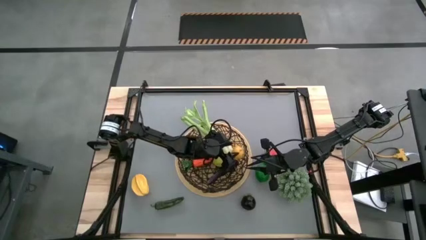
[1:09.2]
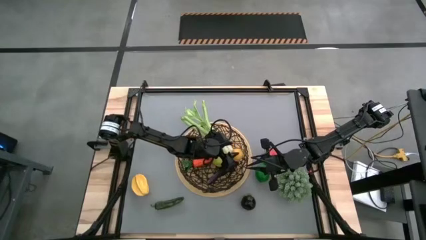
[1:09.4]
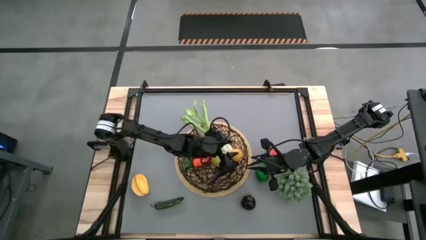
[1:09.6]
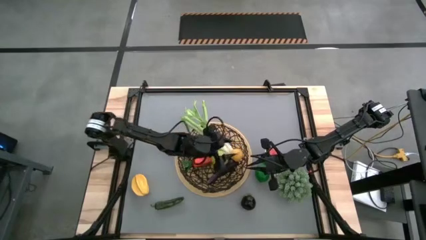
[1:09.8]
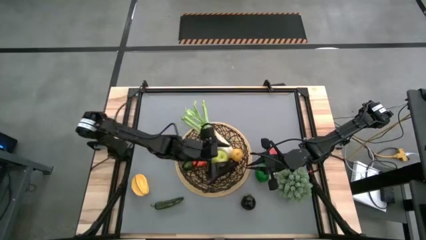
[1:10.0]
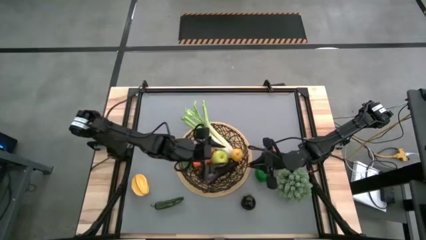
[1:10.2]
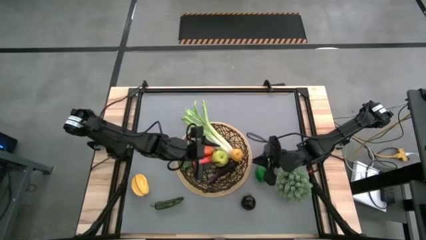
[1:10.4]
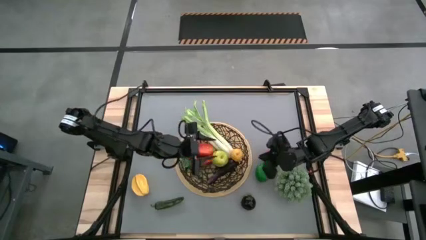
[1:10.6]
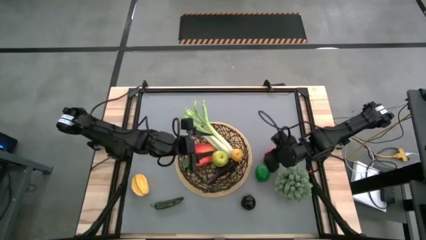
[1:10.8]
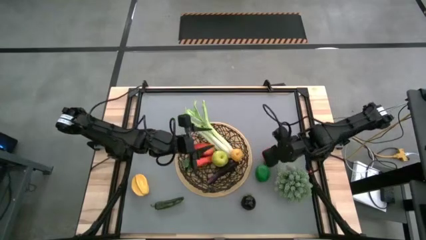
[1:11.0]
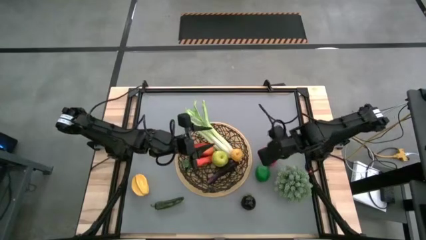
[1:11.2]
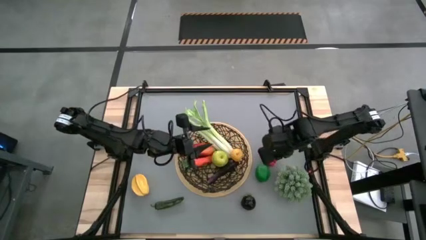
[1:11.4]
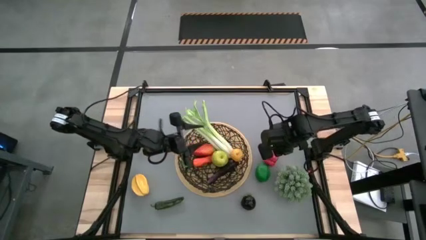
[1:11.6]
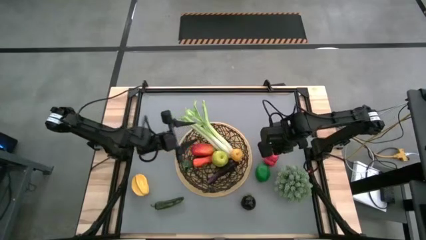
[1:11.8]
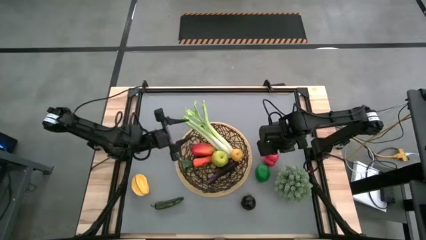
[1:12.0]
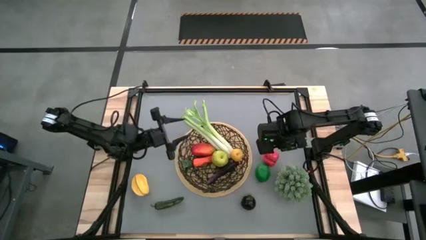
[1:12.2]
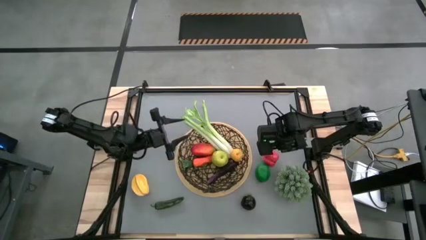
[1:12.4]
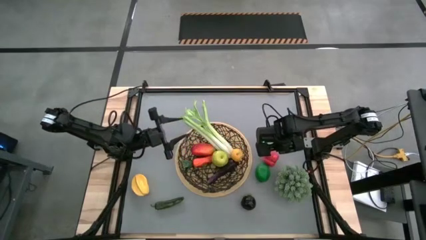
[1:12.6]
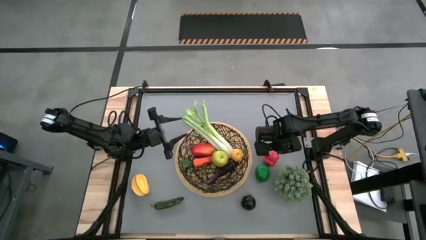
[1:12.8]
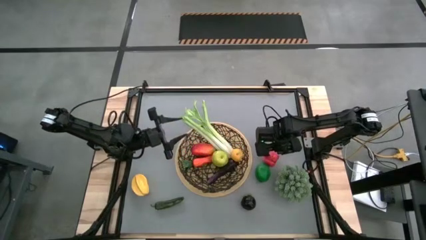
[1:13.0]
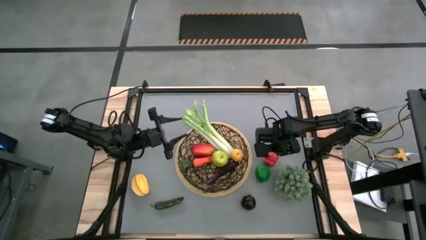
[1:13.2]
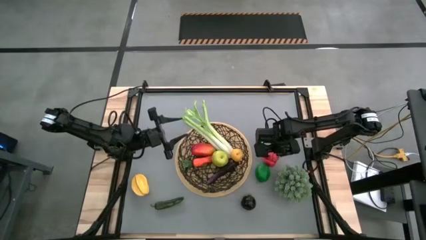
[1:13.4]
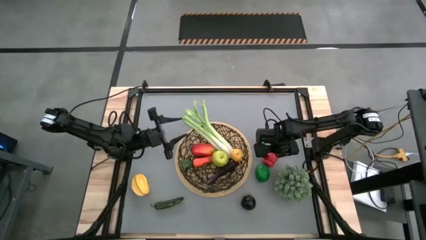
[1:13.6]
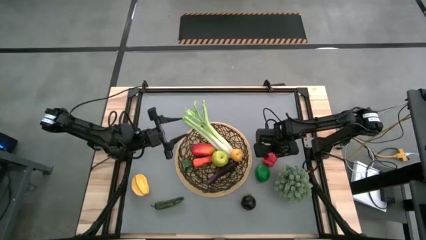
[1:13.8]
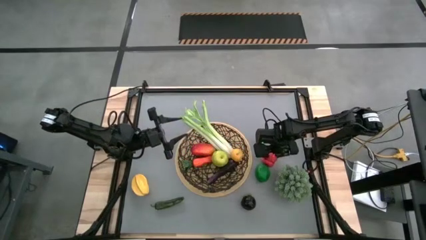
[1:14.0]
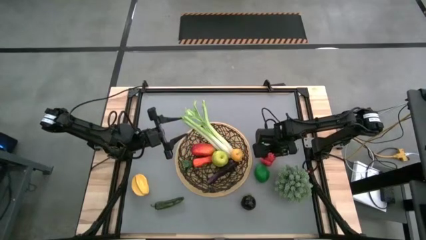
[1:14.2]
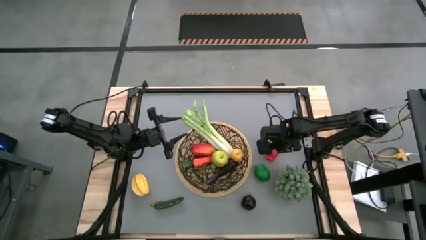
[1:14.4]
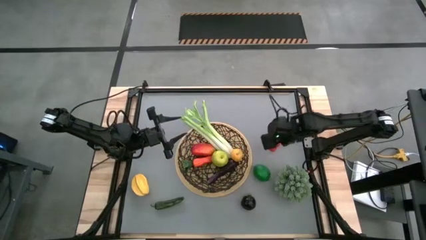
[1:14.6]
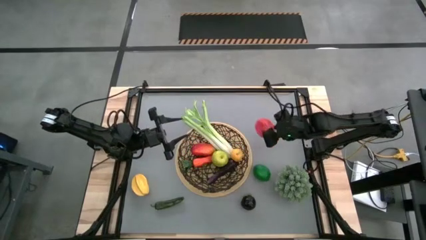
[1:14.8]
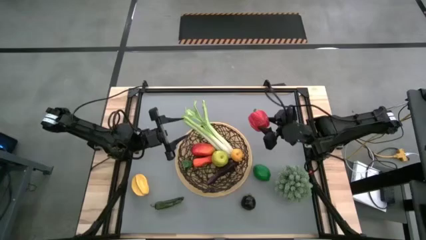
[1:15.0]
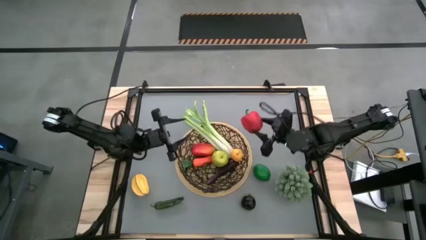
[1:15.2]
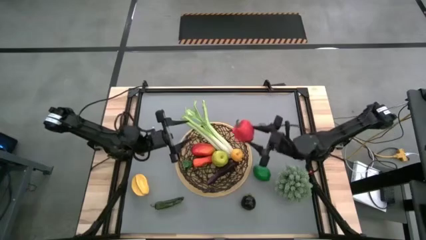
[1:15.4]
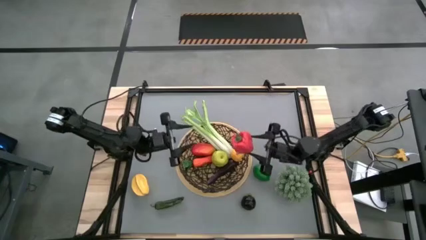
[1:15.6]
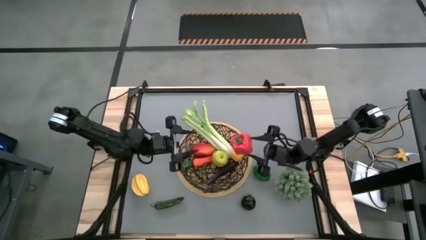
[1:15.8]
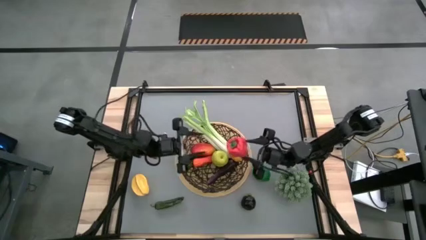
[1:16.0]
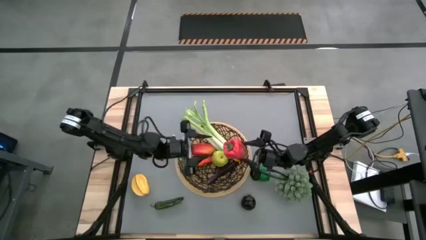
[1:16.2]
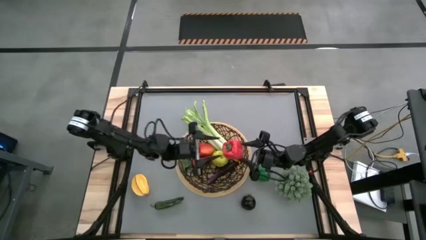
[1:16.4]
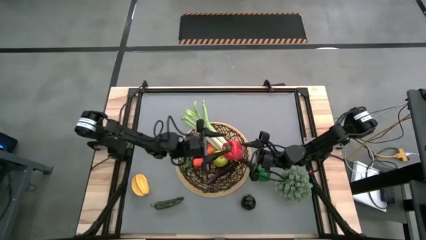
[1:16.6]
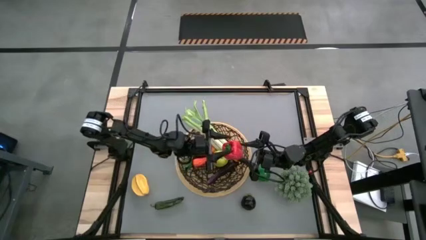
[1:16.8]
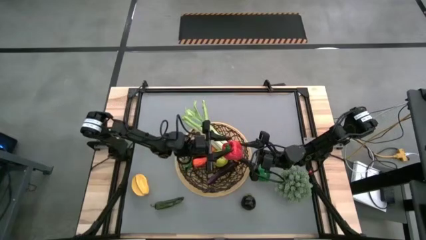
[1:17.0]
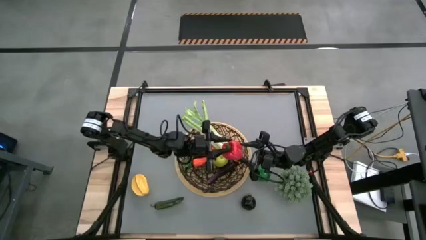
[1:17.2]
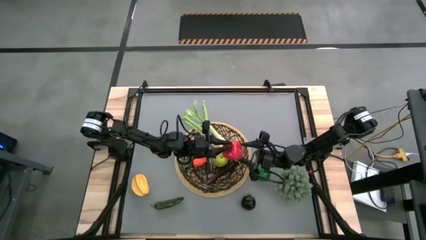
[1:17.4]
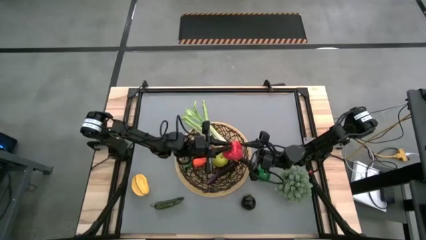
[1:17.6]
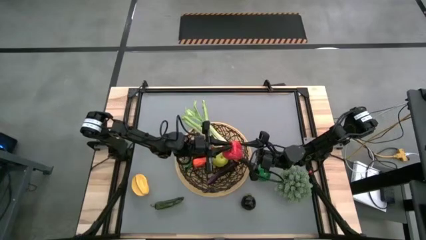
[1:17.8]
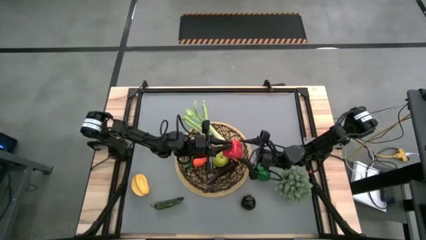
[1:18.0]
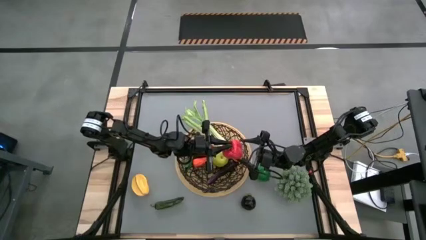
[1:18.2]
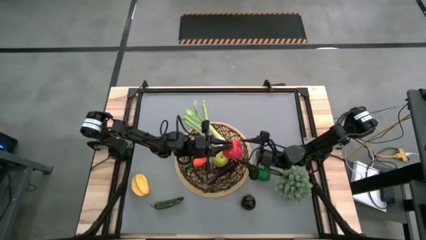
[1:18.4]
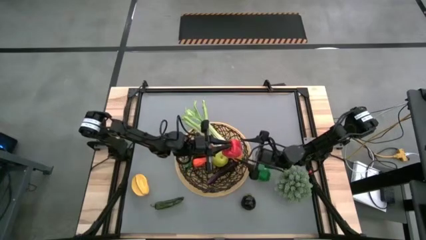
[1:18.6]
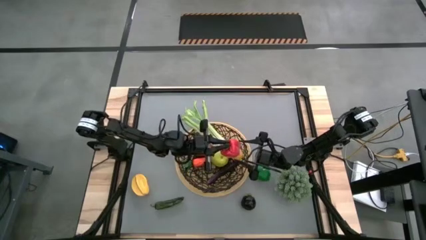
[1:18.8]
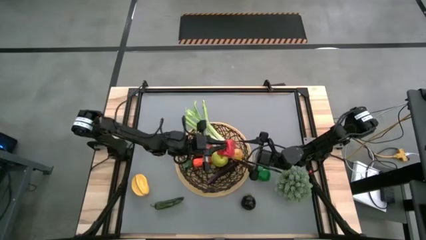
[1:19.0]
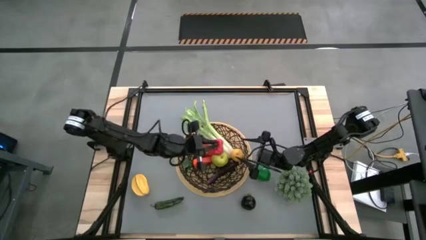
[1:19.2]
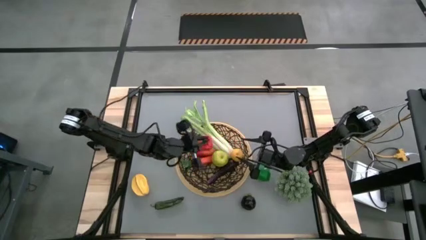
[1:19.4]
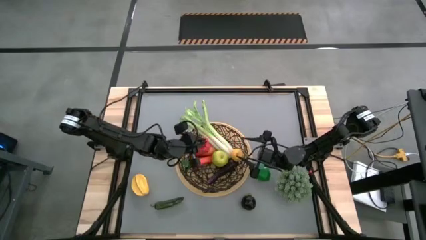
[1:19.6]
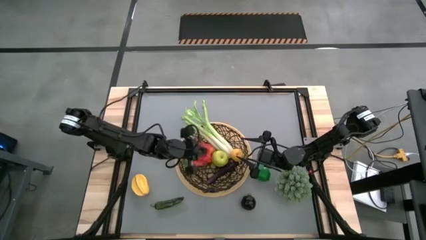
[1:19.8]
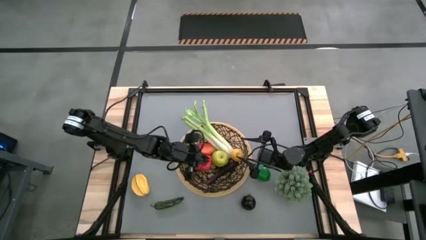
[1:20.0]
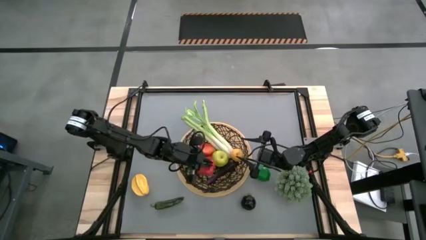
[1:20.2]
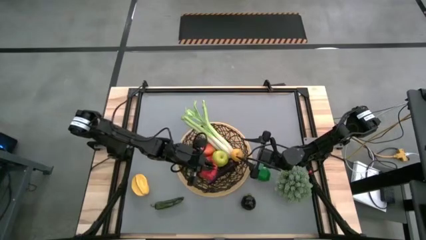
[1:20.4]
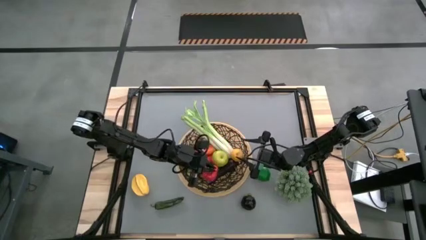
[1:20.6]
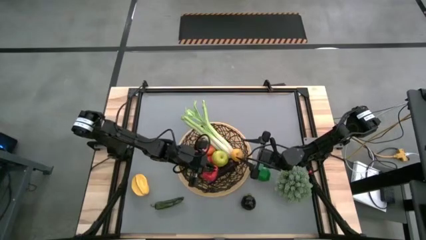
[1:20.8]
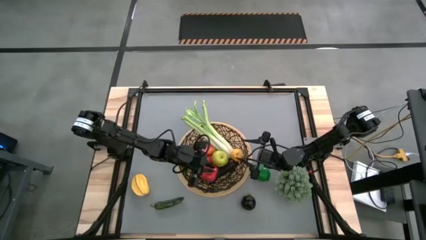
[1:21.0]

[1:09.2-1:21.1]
Task: Build produce basket
Put the red bell pepper into the wire basket

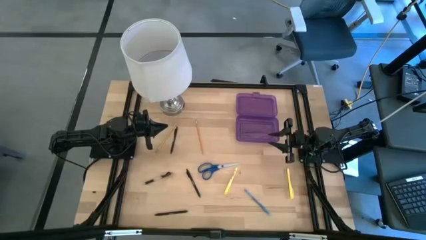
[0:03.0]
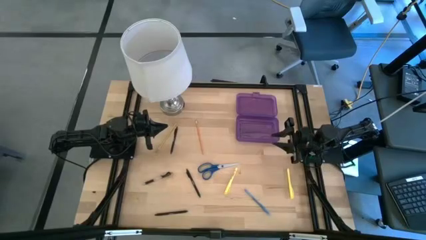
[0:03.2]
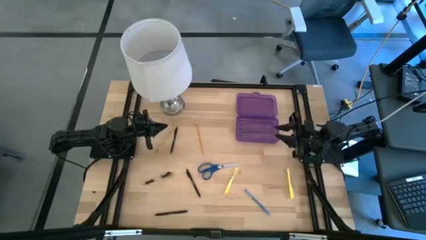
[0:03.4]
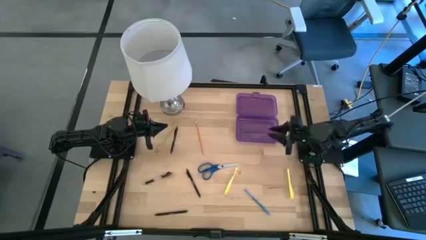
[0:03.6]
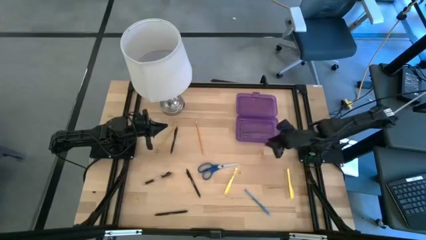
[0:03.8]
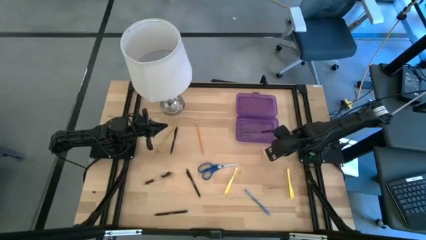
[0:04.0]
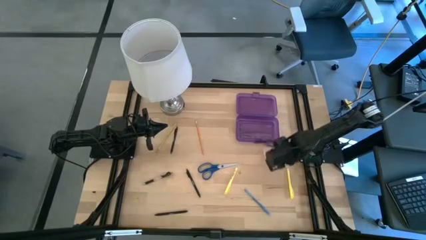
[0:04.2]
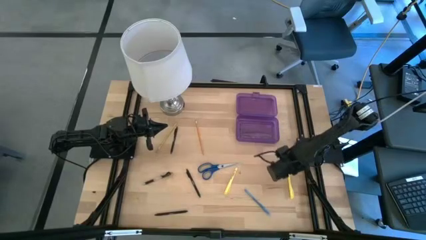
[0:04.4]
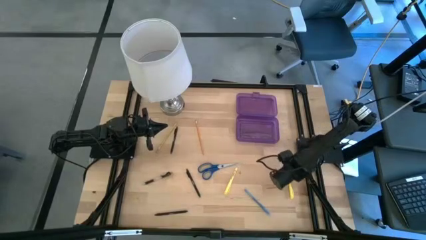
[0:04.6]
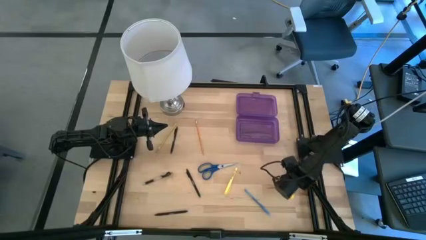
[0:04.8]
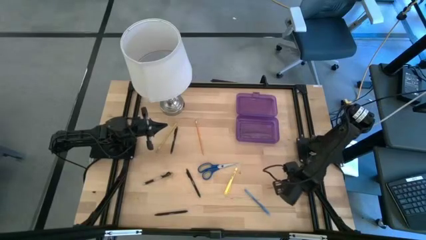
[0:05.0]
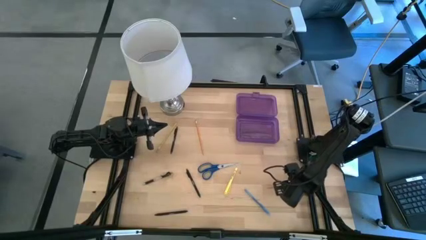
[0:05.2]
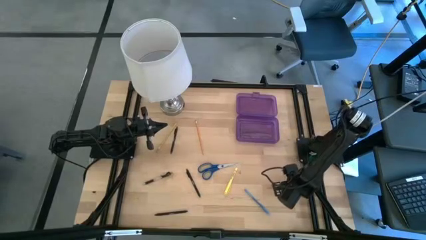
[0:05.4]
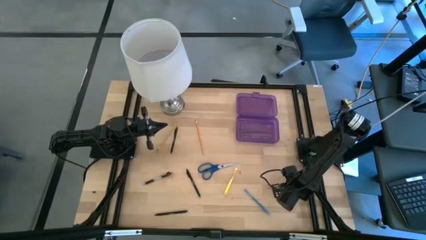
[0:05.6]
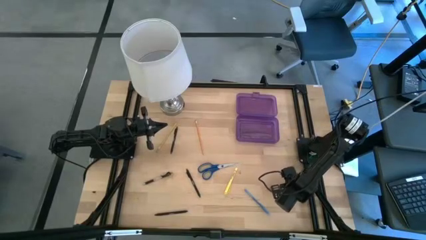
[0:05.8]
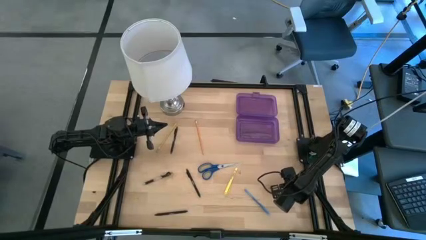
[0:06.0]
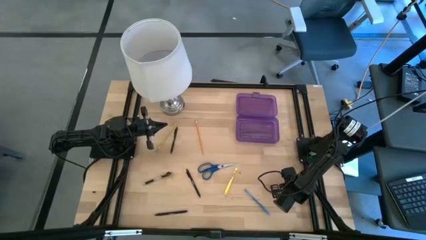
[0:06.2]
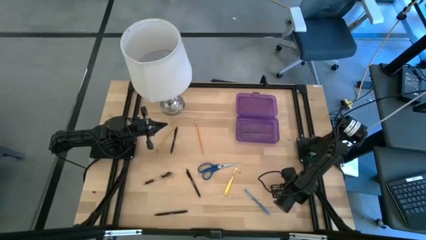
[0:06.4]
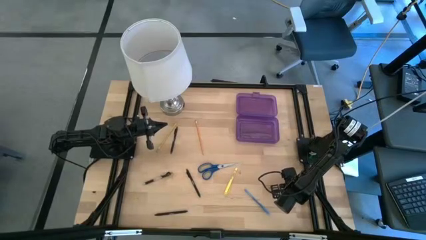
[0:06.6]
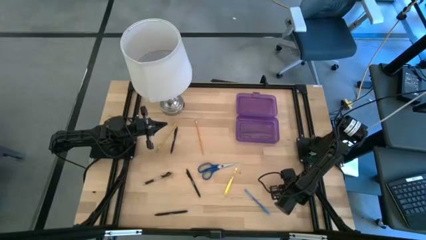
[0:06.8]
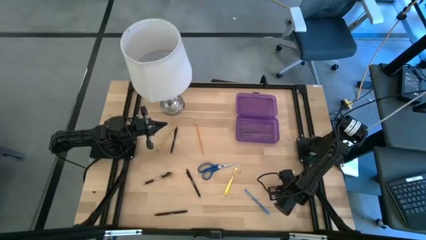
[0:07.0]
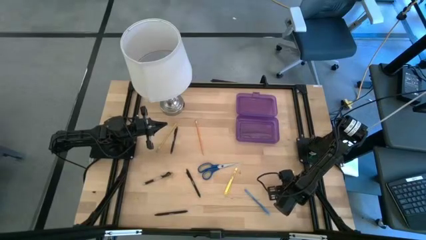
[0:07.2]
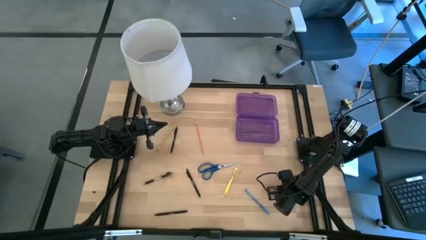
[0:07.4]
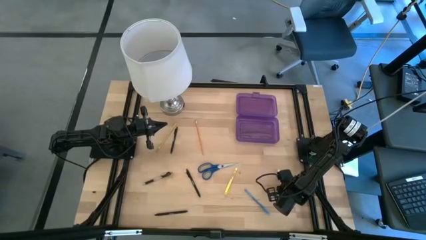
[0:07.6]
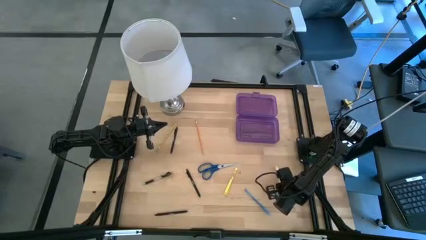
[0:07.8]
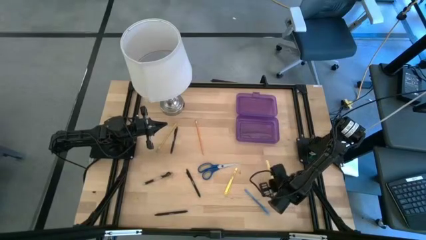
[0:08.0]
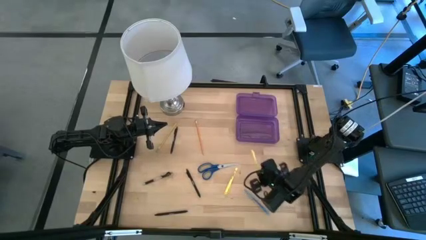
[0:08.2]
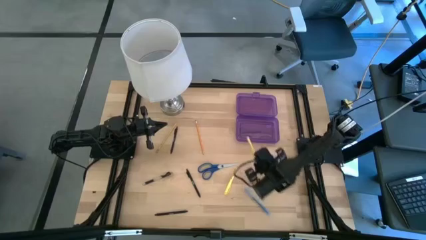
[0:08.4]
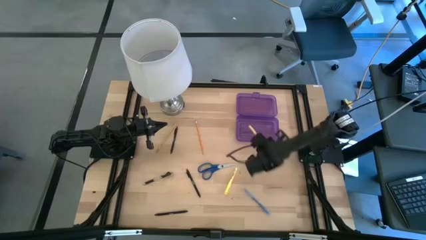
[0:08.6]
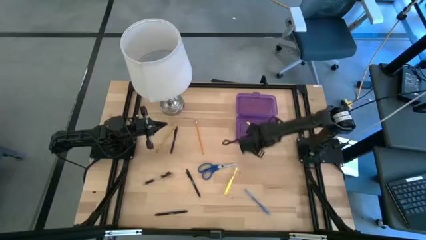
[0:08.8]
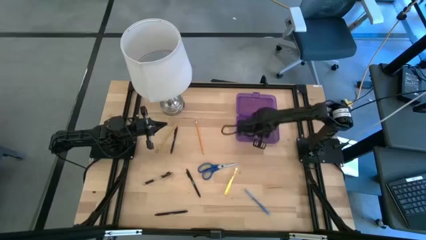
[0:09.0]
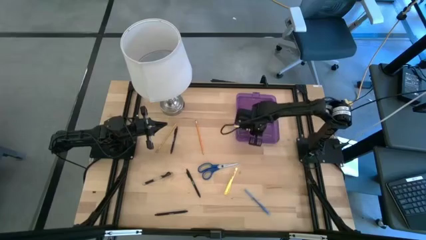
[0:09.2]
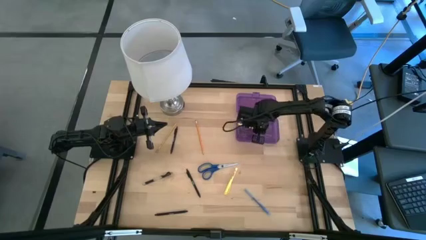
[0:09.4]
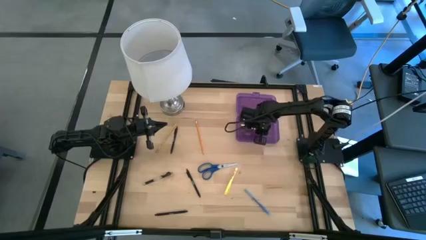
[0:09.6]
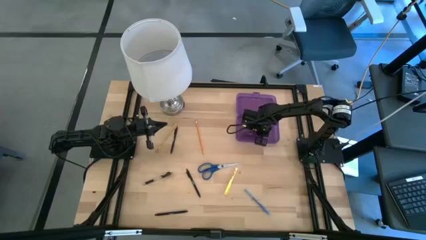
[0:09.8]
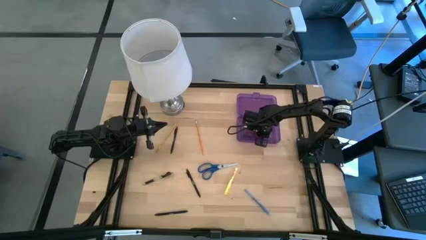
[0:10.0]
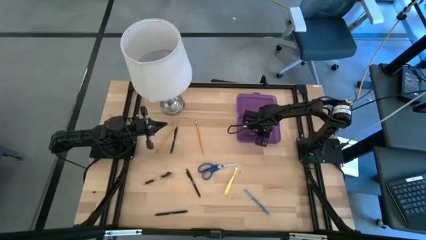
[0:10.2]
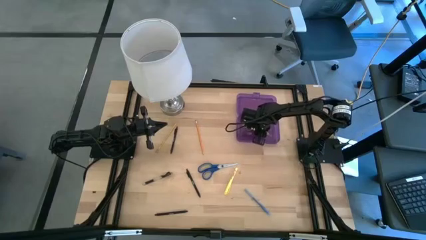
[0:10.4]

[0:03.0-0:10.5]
Task: Pick & place school supplies into a supply box
Put the right yellow pen into the purple supply box
